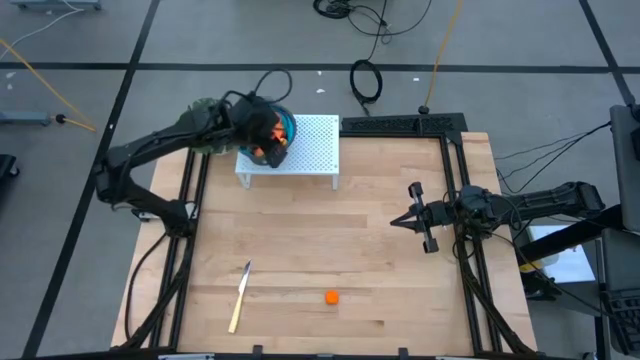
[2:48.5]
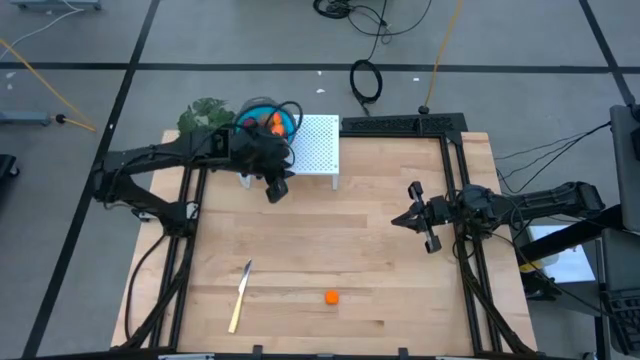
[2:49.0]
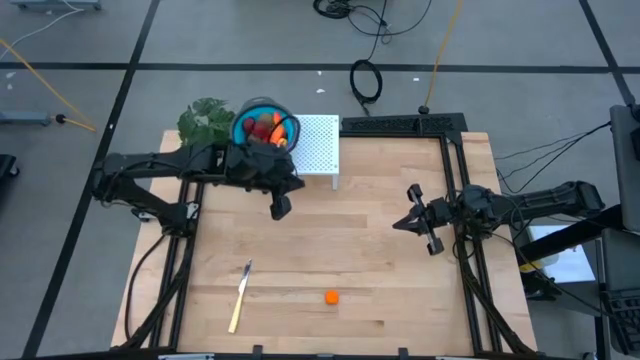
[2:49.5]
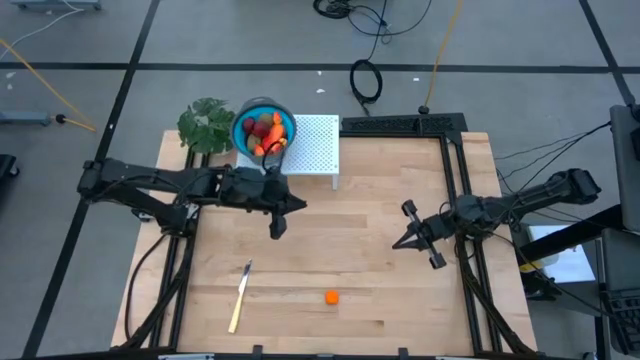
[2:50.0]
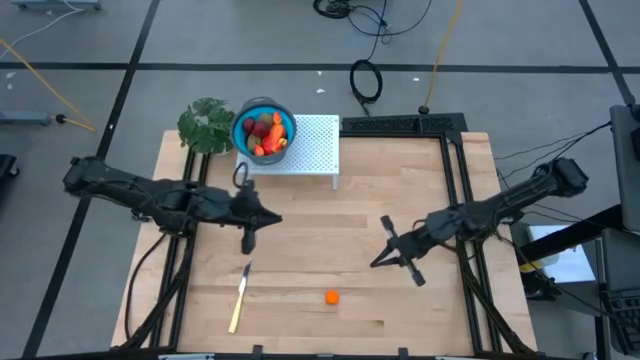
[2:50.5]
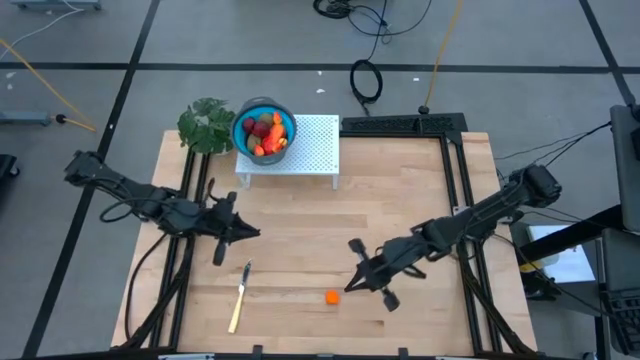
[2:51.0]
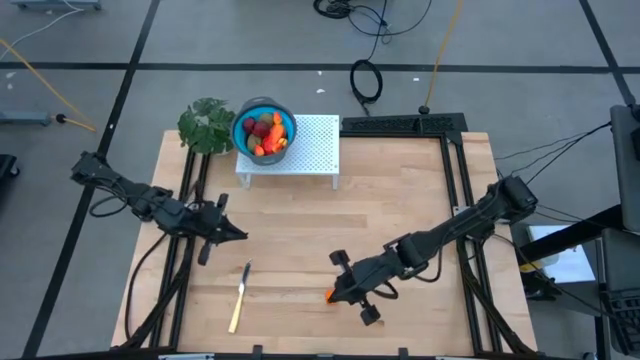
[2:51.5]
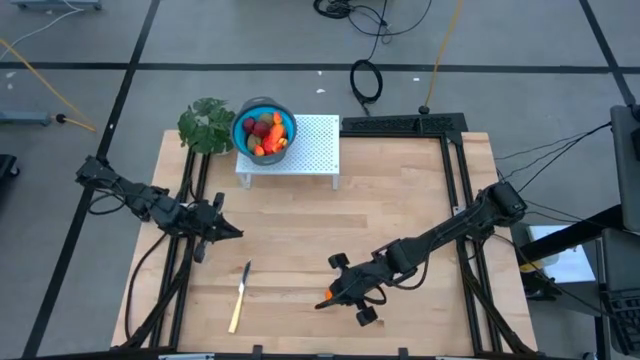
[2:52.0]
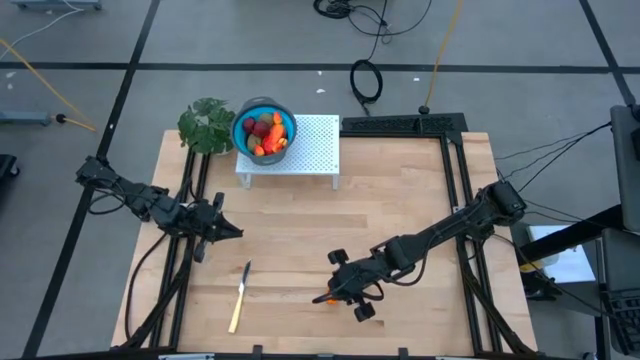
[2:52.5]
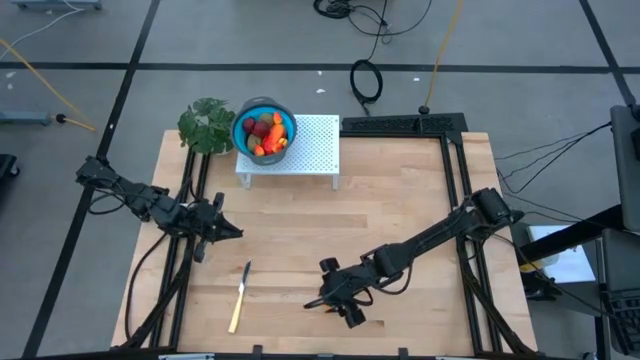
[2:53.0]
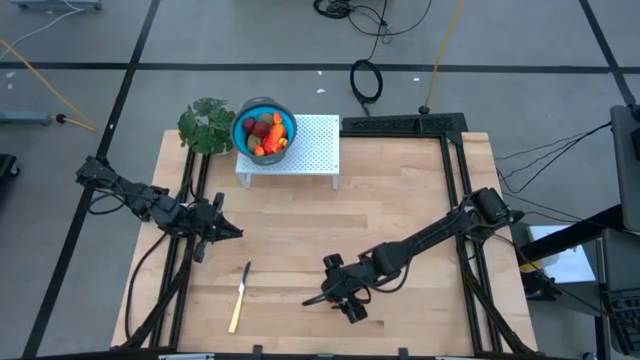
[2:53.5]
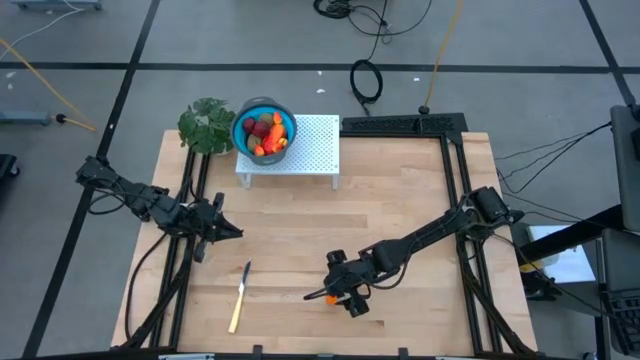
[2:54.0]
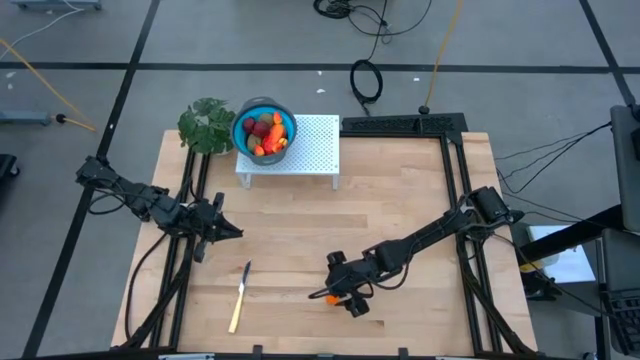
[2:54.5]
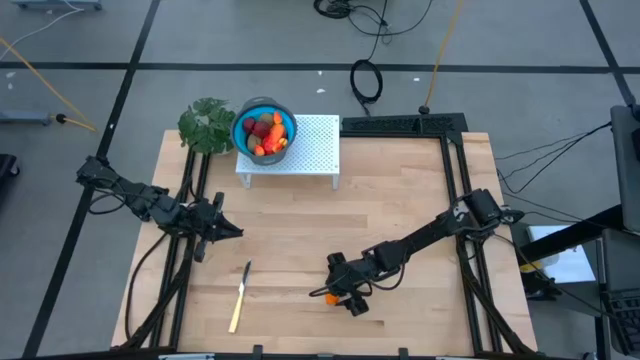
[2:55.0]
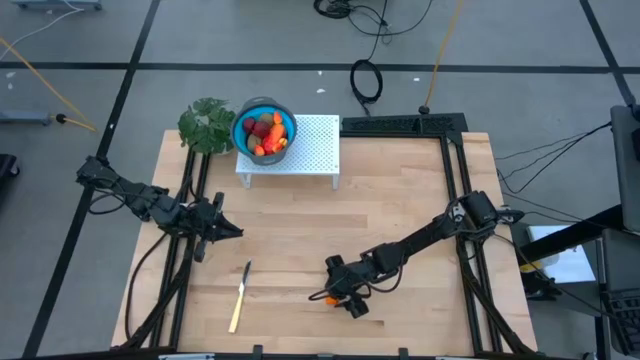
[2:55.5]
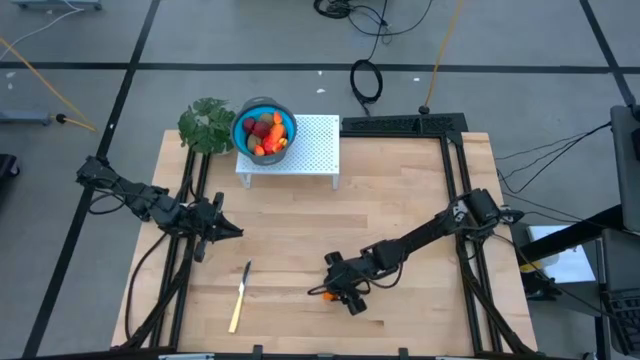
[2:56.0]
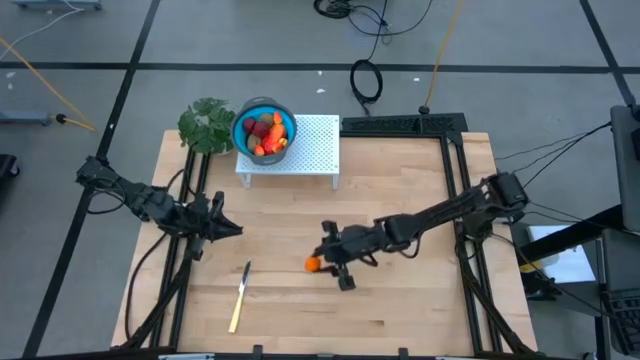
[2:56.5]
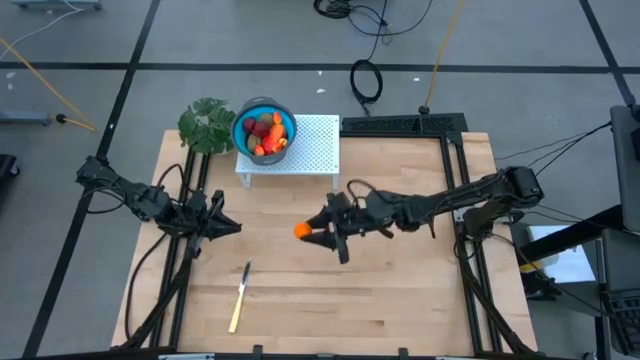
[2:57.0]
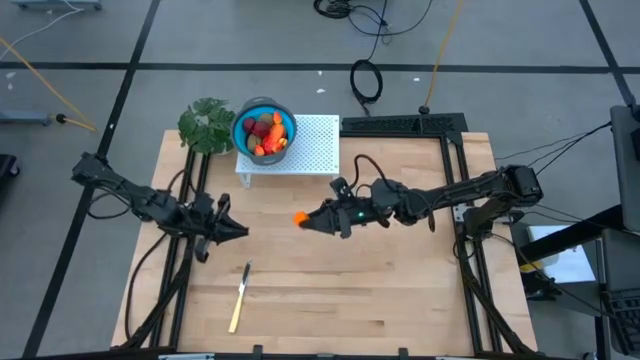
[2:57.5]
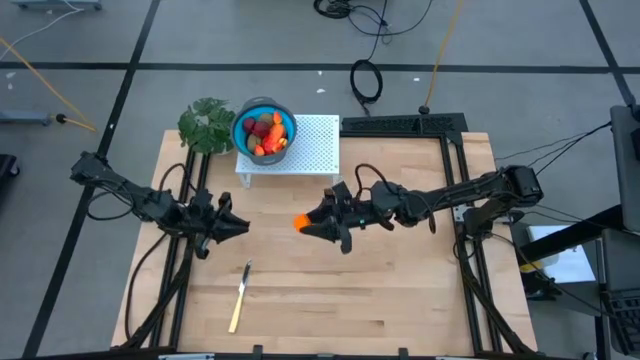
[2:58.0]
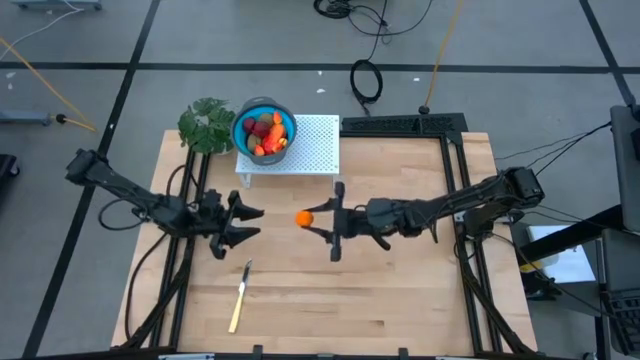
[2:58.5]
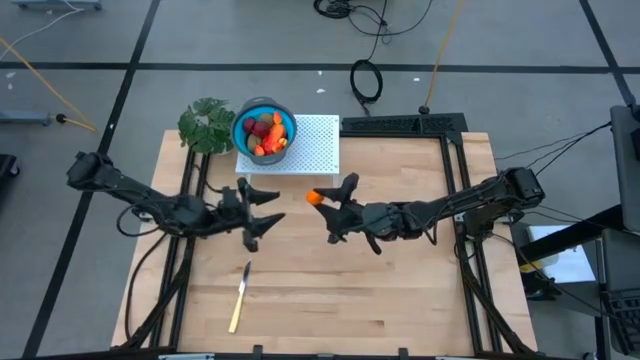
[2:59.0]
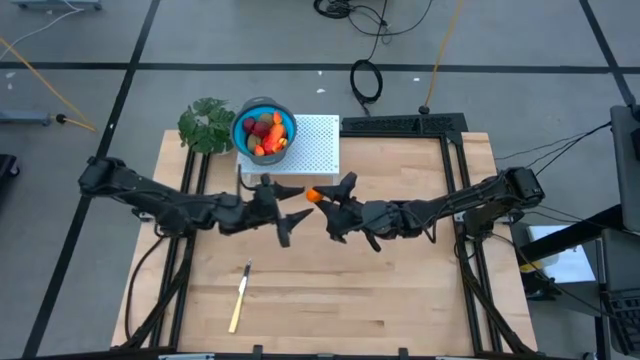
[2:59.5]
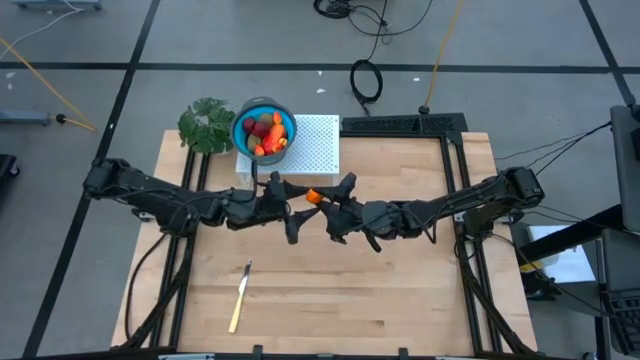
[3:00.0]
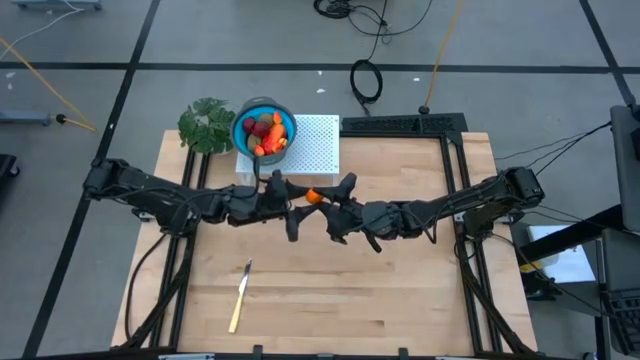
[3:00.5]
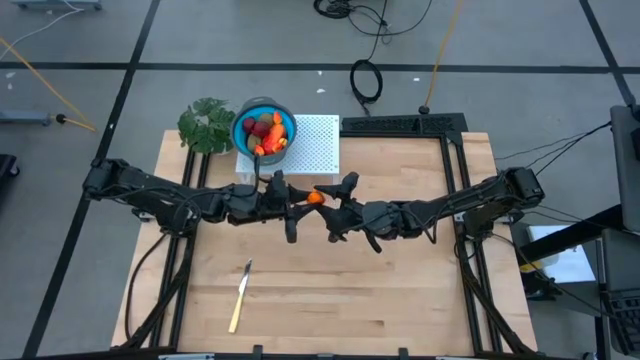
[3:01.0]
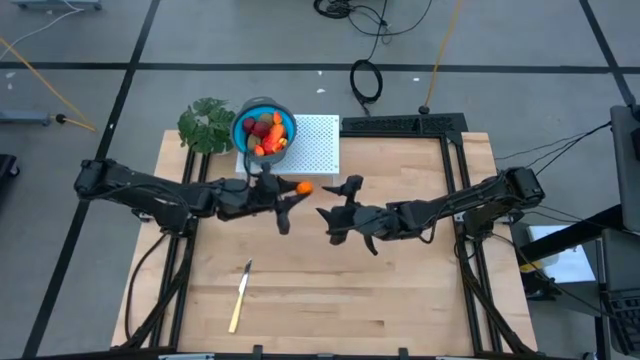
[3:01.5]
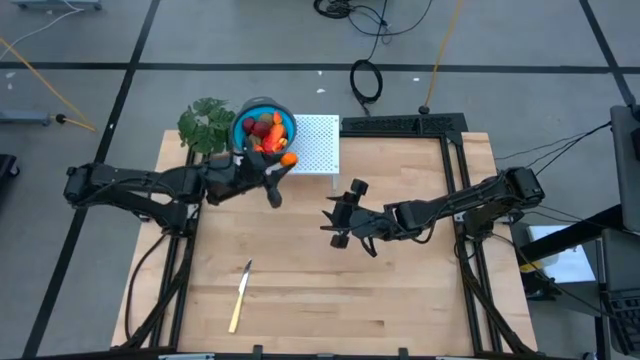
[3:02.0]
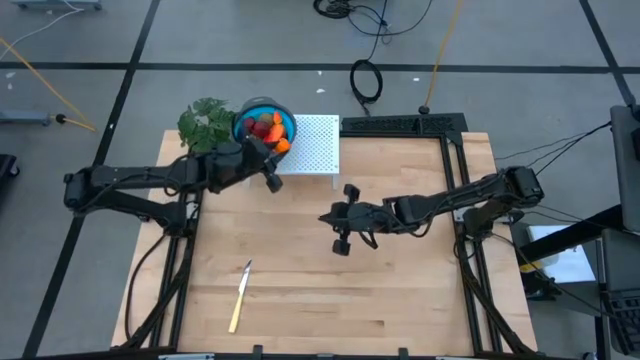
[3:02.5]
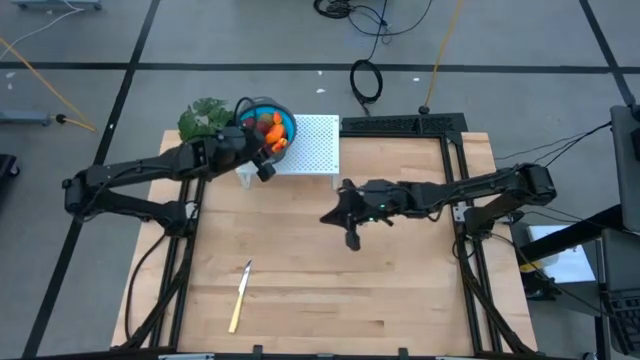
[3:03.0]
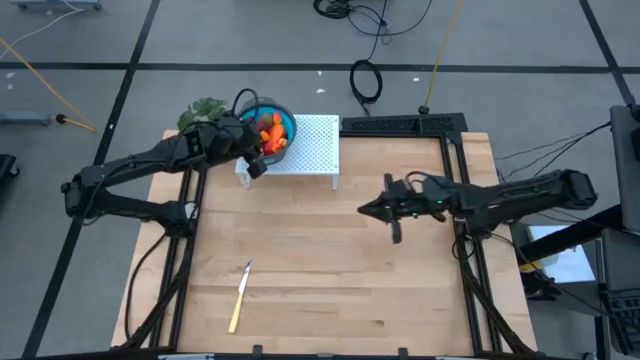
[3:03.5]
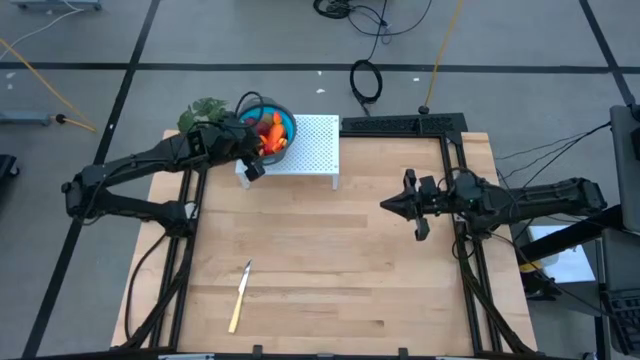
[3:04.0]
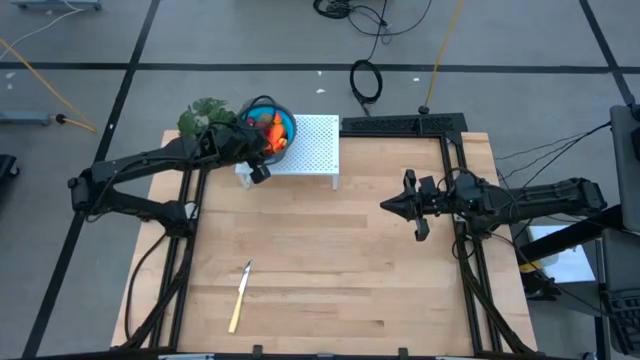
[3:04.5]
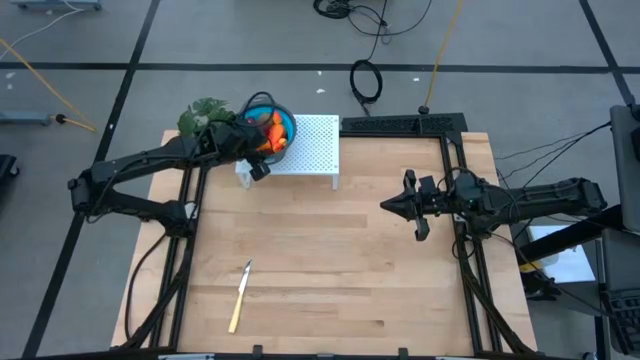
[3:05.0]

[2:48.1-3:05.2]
Task: Pick & Place Fruit
Put the tangerine into the blue strainer bowl on the shelf

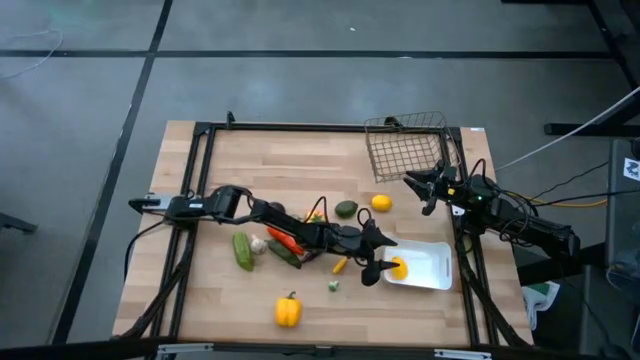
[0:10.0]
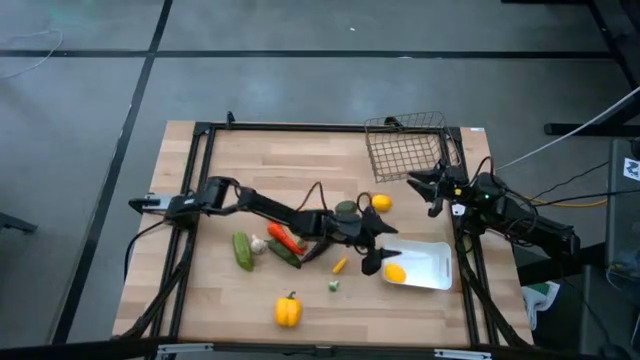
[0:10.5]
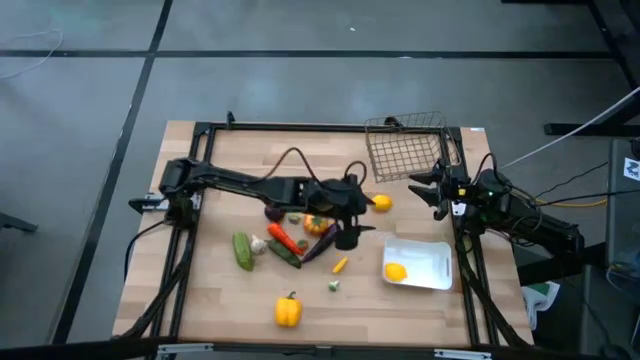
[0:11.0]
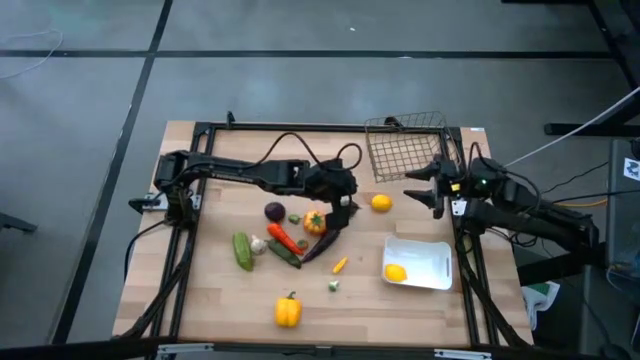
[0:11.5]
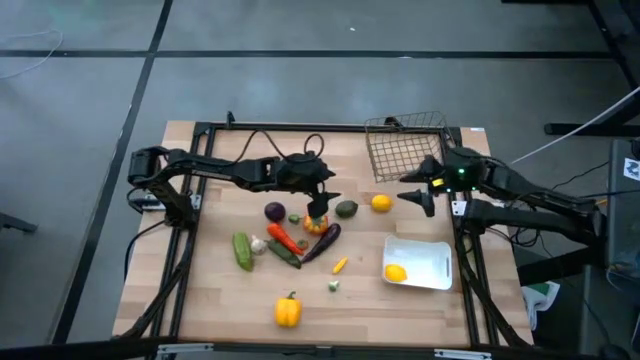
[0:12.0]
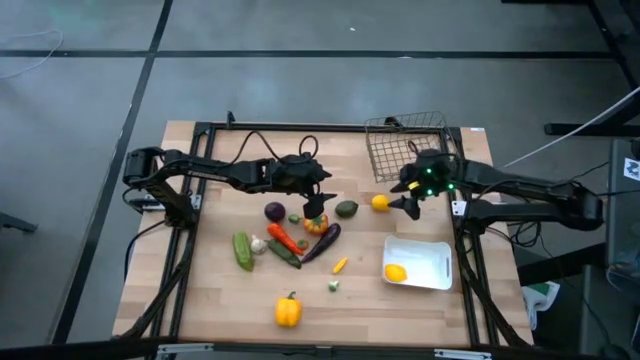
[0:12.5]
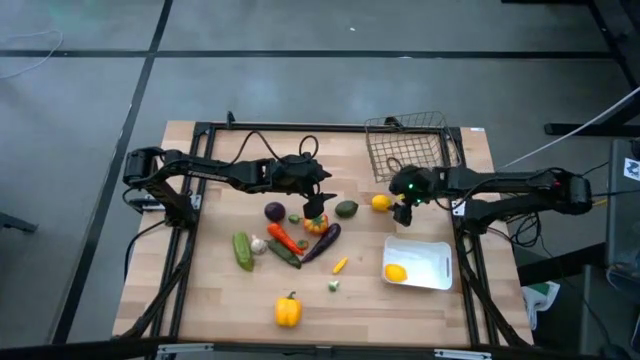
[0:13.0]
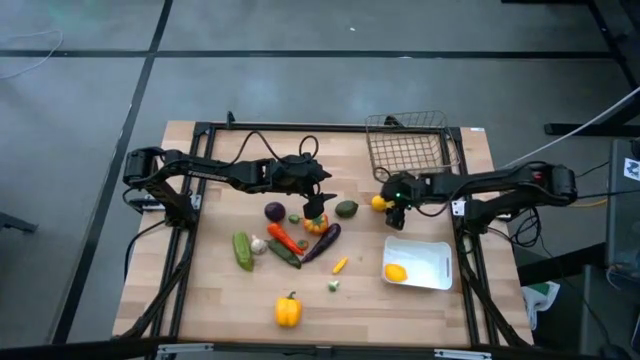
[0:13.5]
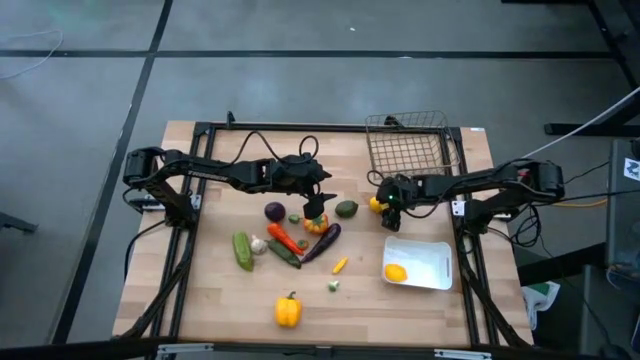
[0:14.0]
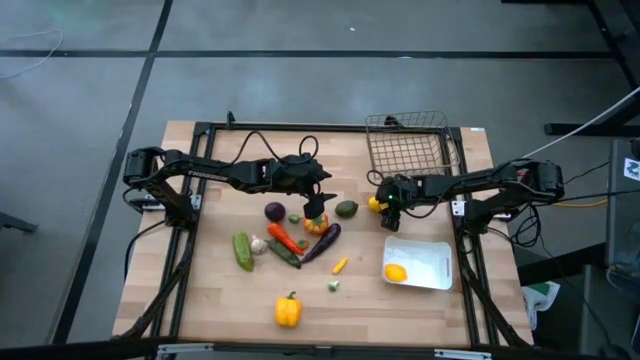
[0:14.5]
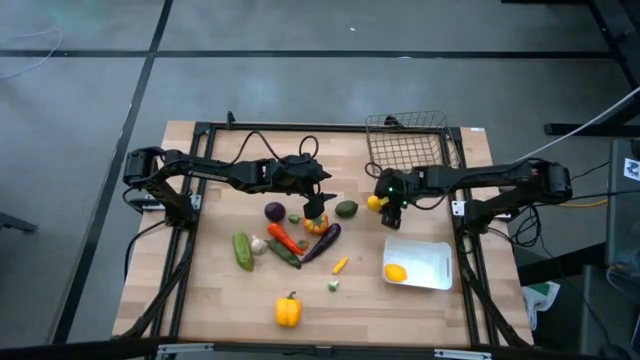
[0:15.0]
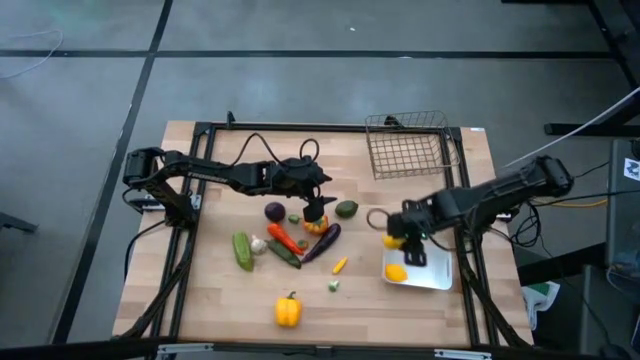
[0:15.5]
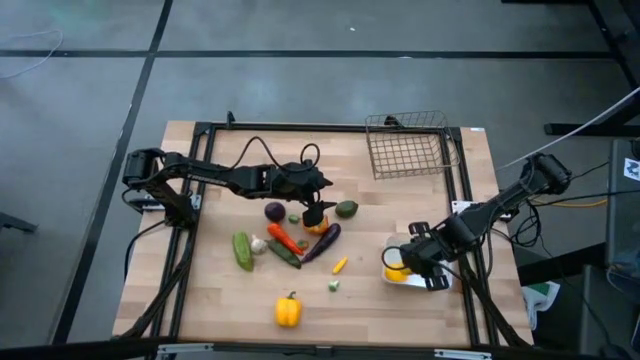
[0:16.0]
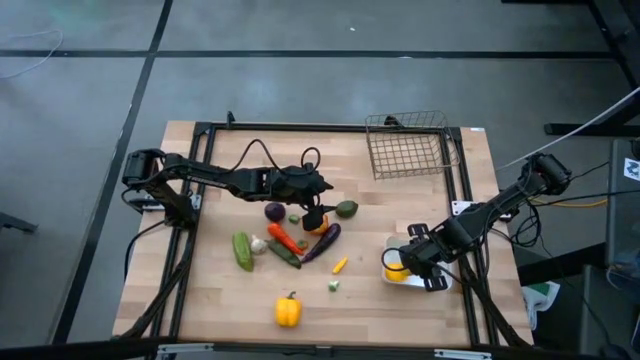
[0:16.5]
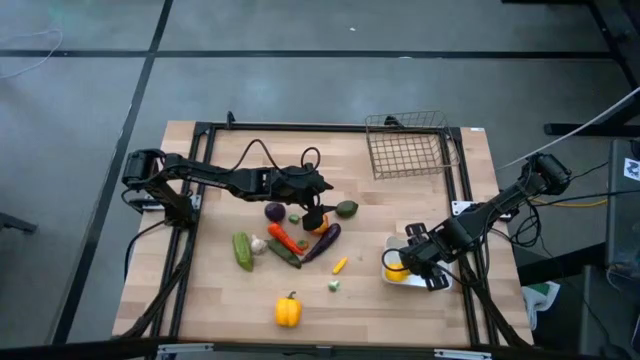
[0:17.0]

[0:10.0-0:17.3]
Task: Sort produce into baskets
Put the yellow lemon into the white bin
